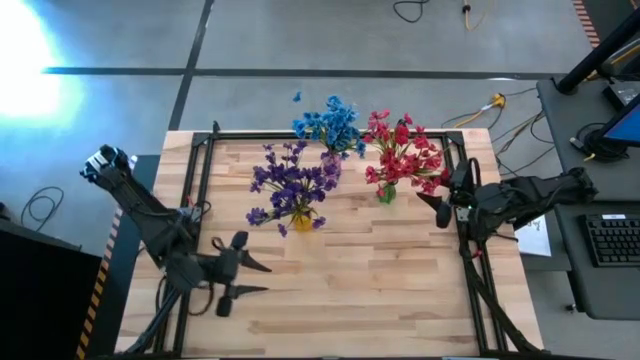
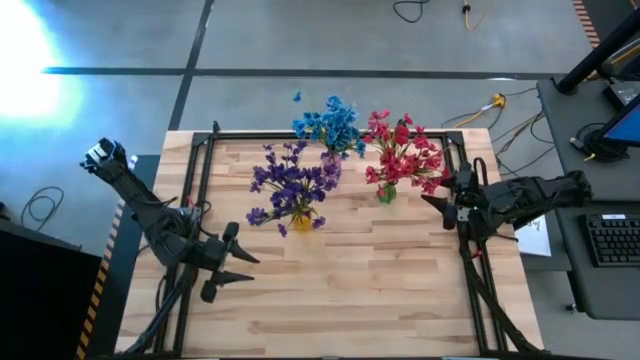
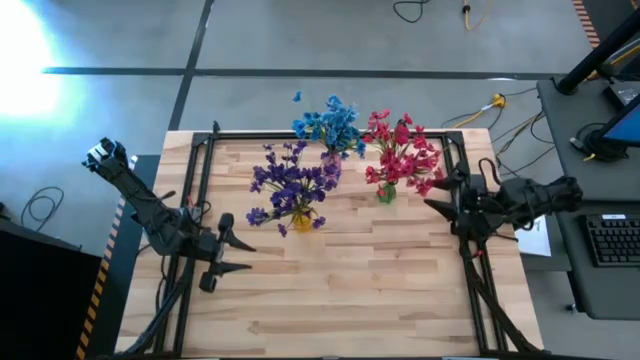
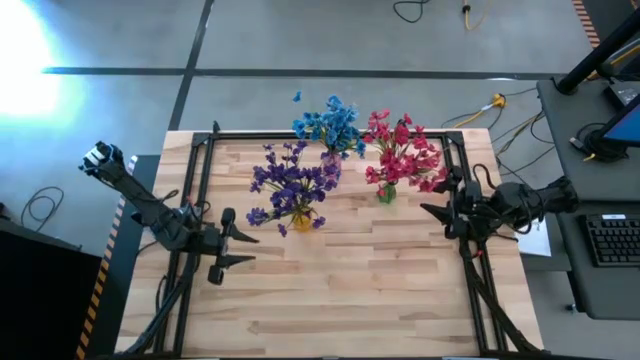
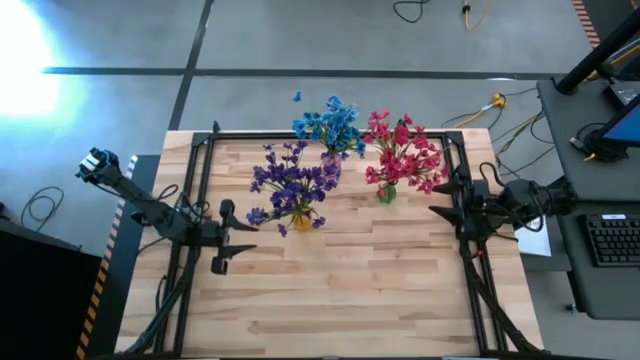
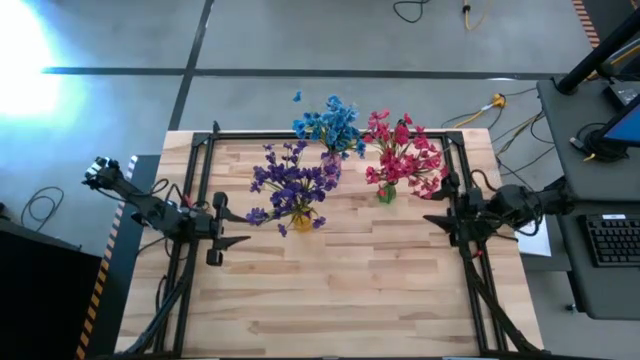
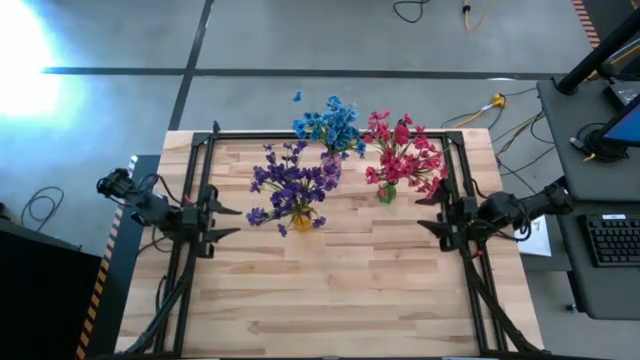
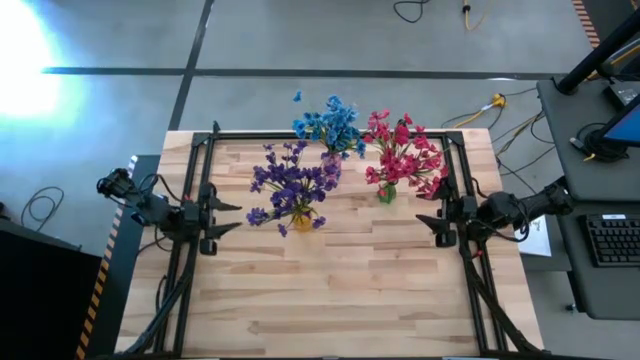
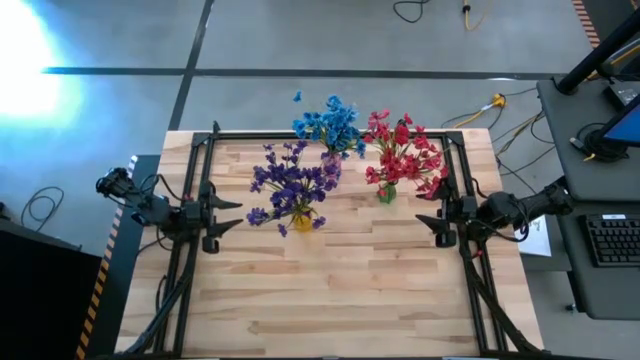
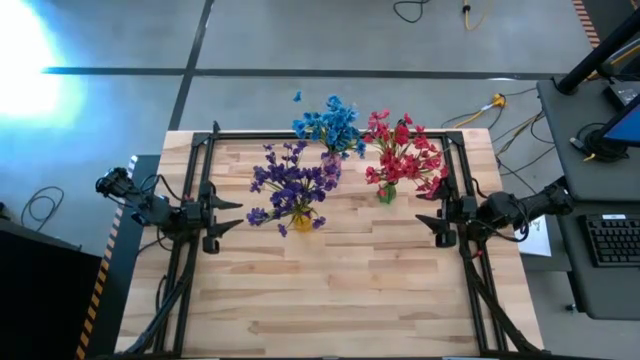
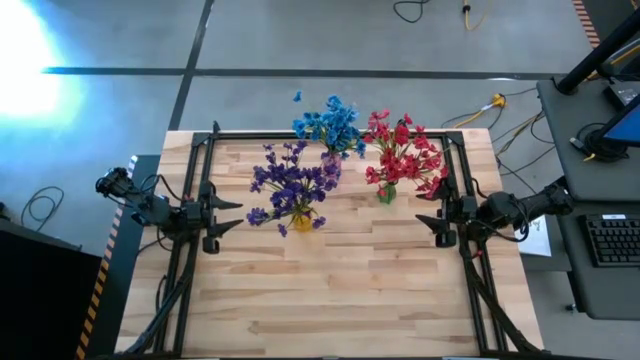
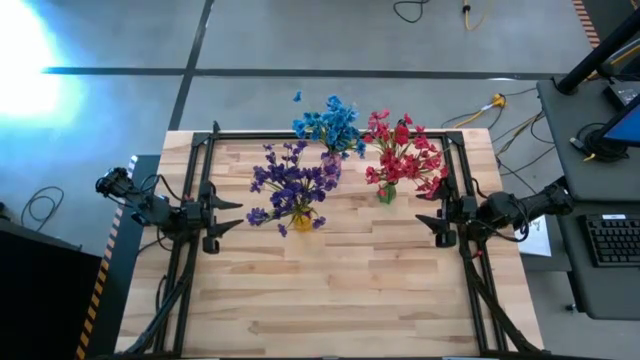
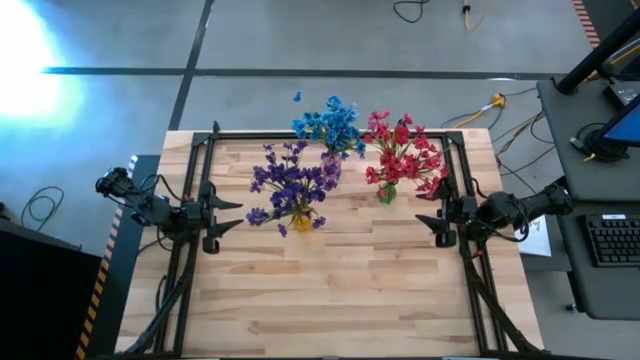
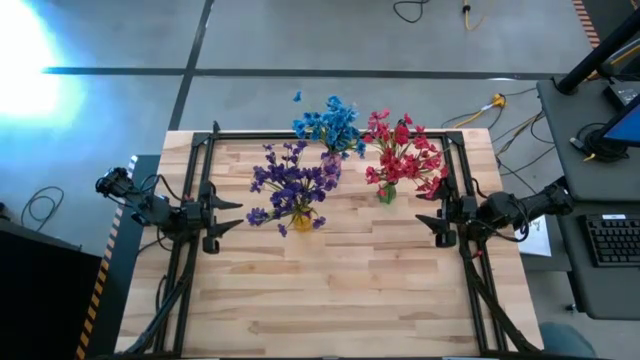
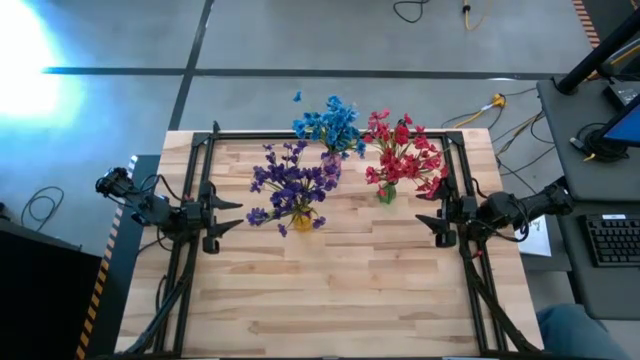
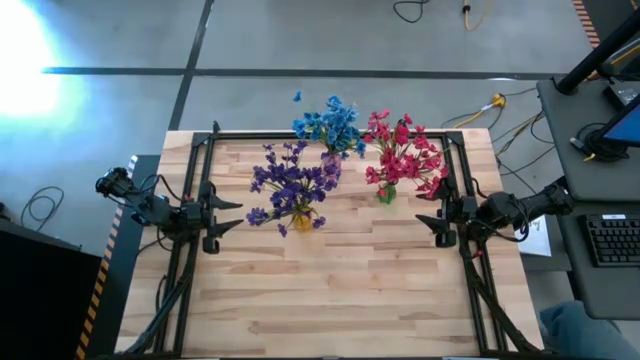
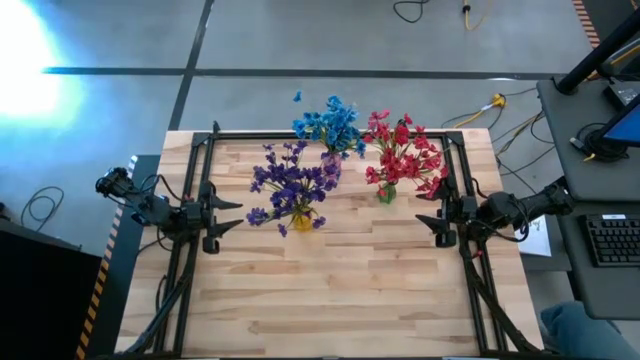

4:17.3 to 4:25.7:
Task: Sort flowers into vase by color
Return to Home Position
